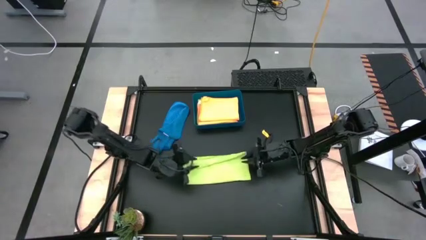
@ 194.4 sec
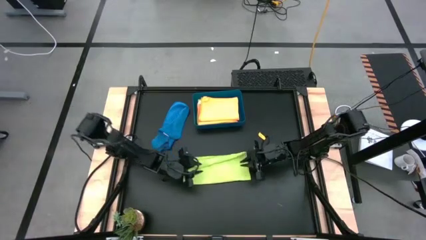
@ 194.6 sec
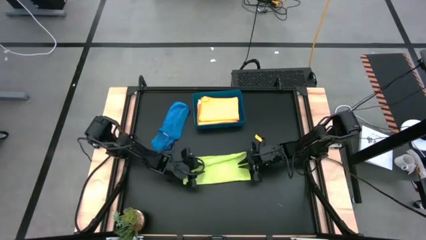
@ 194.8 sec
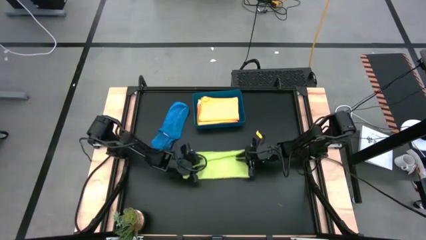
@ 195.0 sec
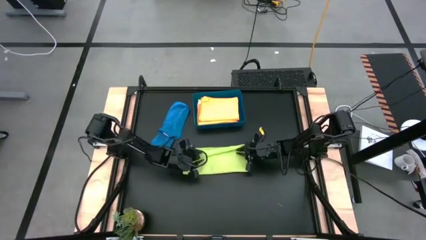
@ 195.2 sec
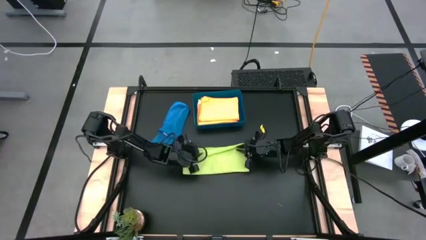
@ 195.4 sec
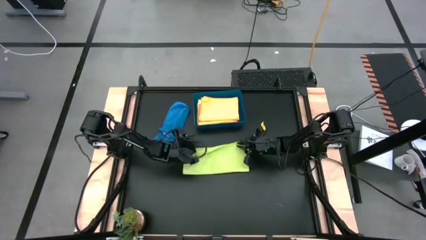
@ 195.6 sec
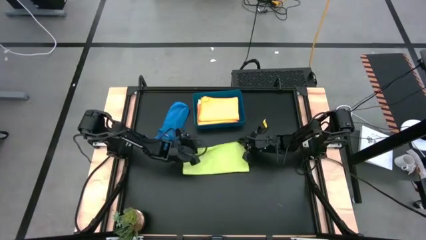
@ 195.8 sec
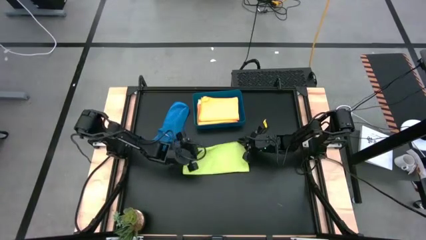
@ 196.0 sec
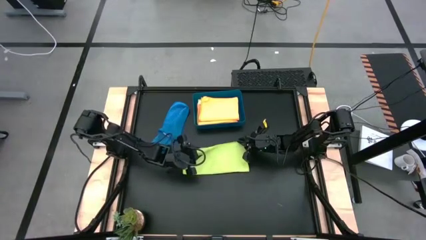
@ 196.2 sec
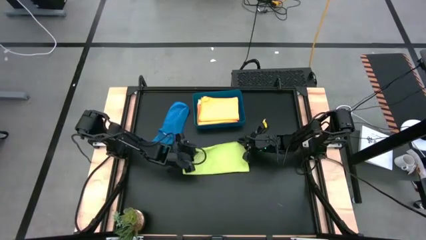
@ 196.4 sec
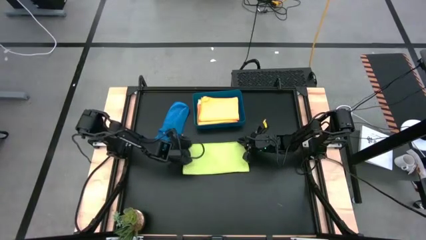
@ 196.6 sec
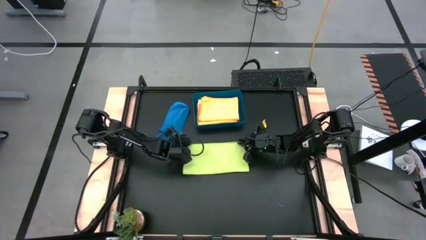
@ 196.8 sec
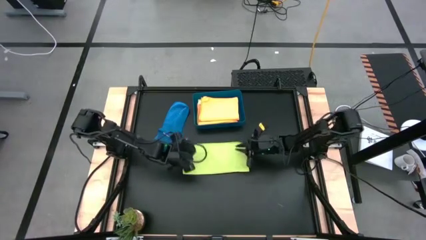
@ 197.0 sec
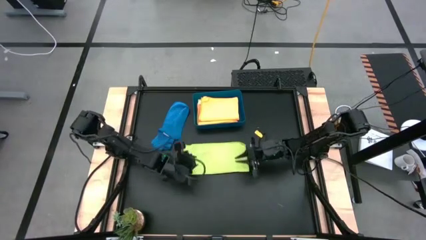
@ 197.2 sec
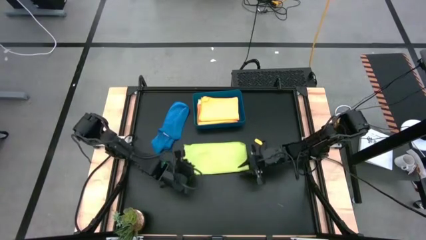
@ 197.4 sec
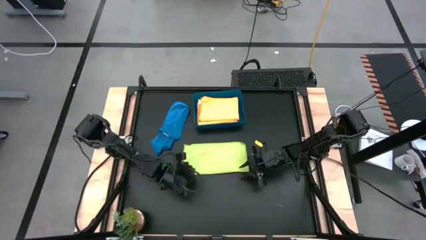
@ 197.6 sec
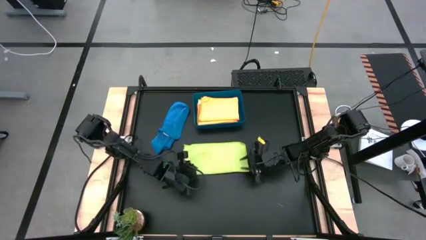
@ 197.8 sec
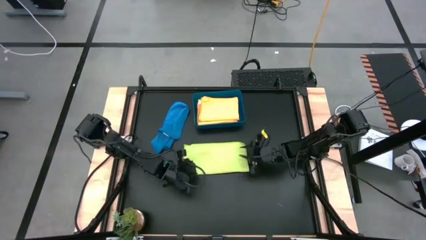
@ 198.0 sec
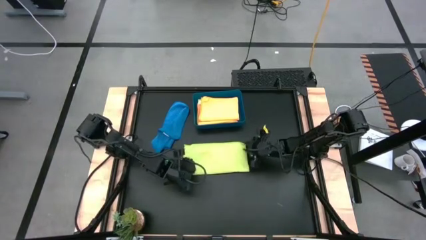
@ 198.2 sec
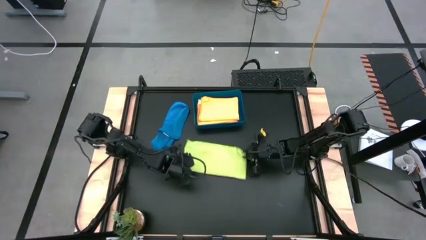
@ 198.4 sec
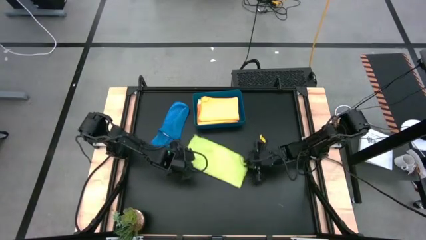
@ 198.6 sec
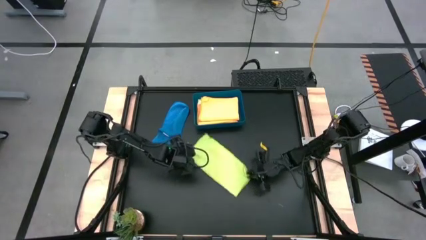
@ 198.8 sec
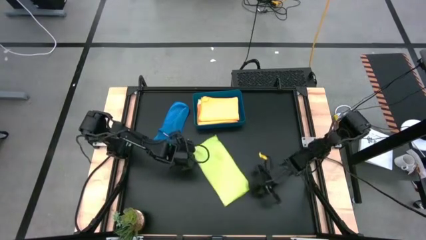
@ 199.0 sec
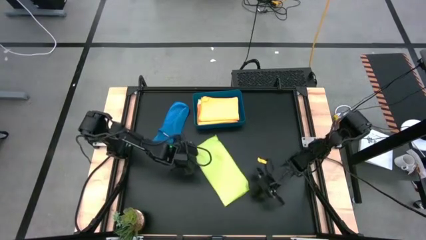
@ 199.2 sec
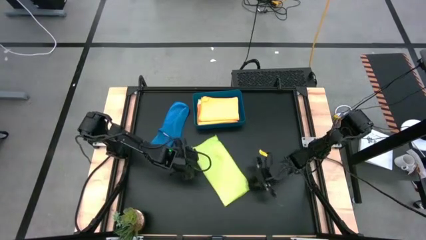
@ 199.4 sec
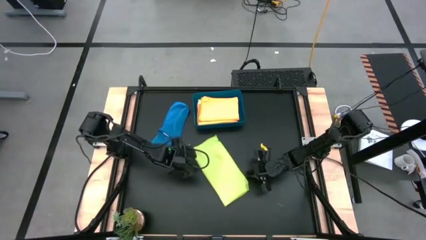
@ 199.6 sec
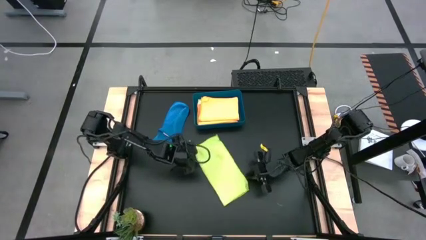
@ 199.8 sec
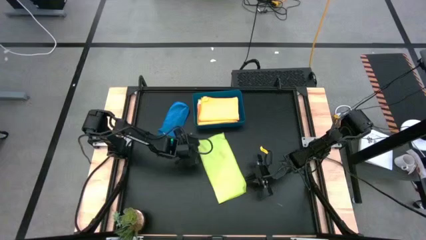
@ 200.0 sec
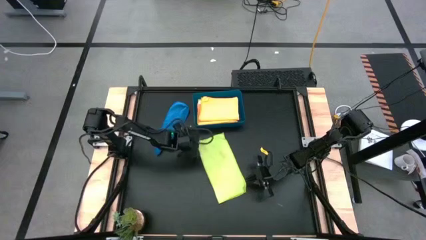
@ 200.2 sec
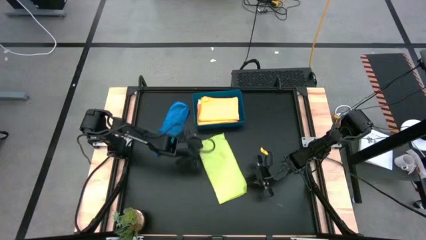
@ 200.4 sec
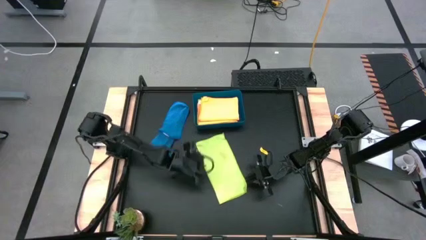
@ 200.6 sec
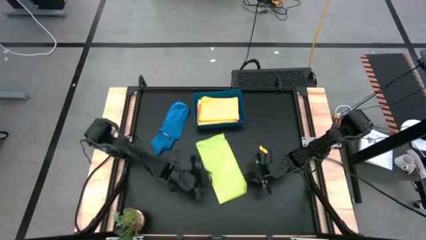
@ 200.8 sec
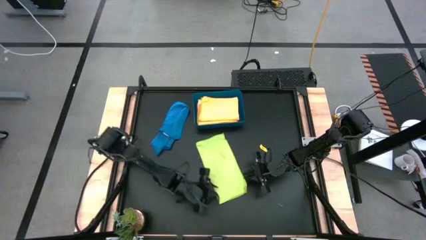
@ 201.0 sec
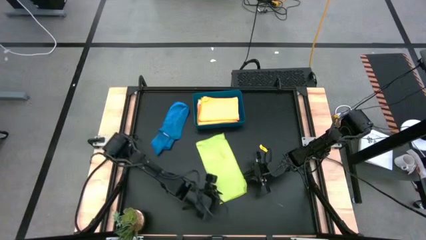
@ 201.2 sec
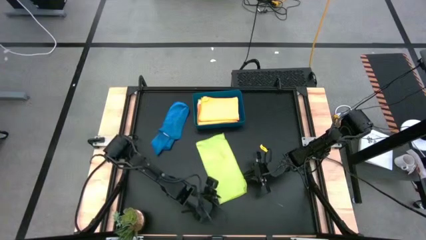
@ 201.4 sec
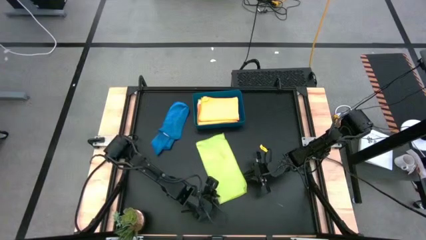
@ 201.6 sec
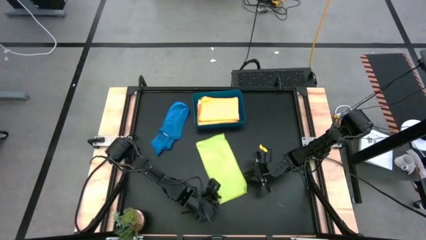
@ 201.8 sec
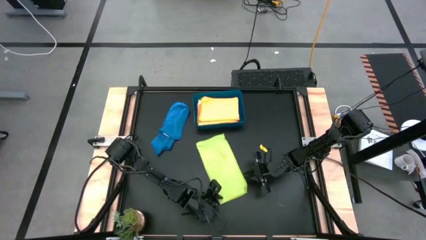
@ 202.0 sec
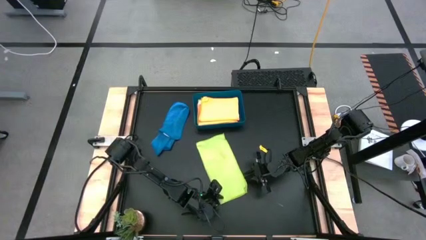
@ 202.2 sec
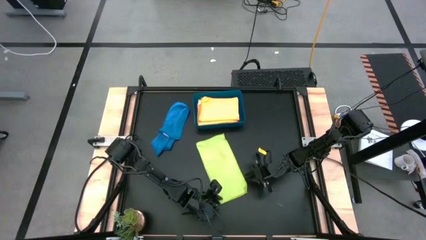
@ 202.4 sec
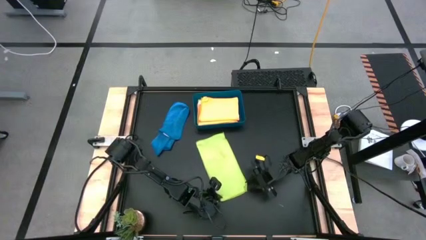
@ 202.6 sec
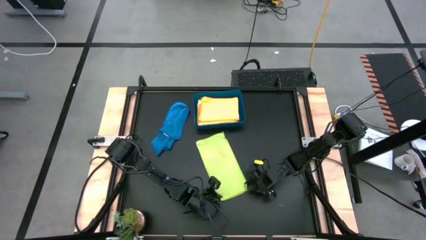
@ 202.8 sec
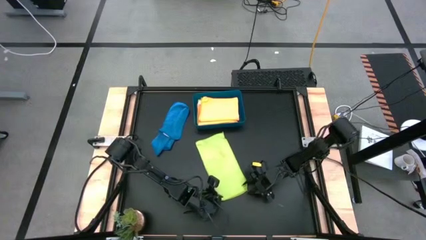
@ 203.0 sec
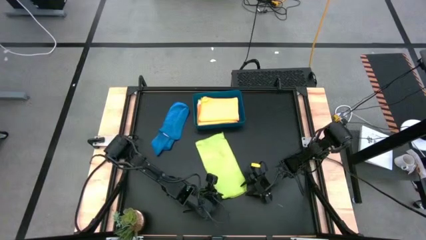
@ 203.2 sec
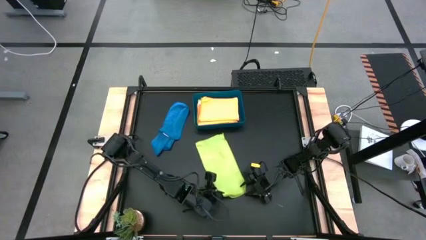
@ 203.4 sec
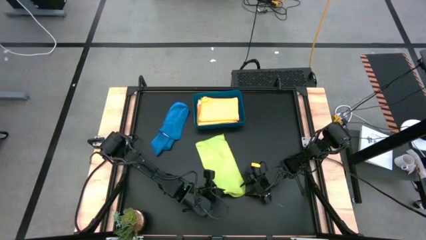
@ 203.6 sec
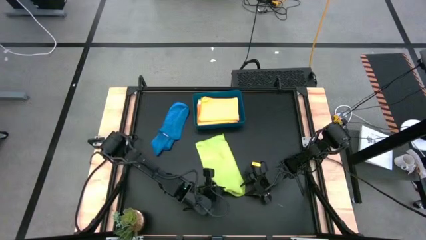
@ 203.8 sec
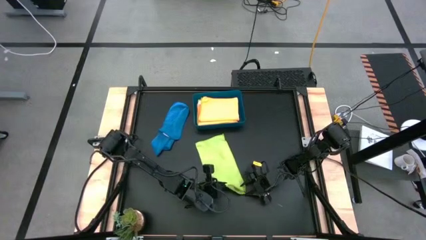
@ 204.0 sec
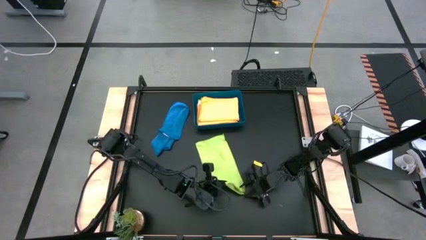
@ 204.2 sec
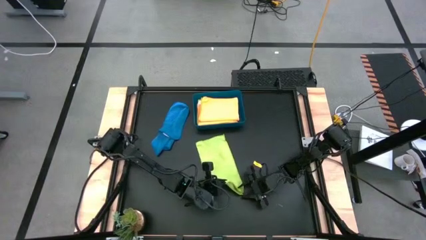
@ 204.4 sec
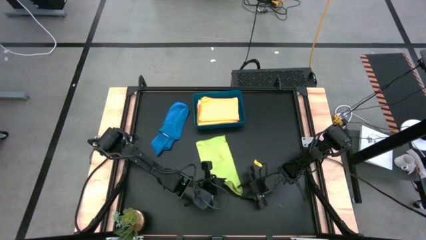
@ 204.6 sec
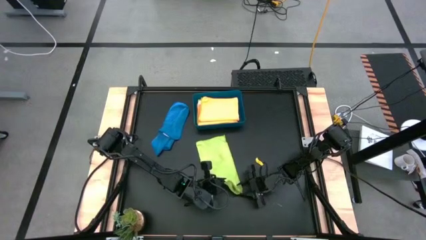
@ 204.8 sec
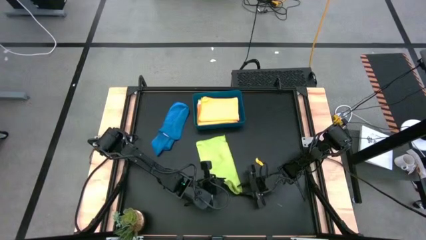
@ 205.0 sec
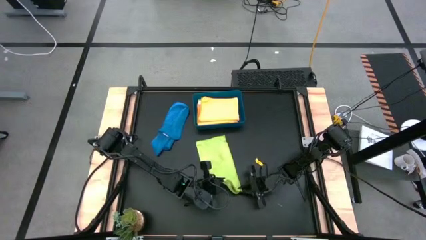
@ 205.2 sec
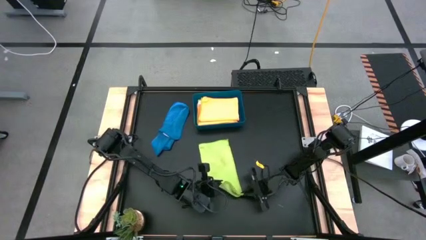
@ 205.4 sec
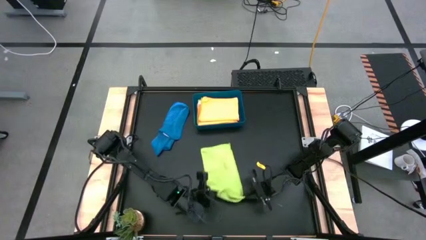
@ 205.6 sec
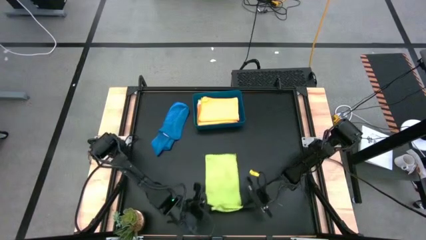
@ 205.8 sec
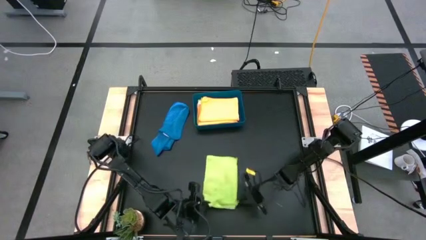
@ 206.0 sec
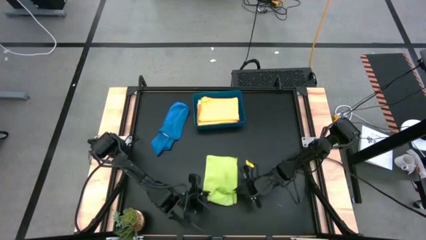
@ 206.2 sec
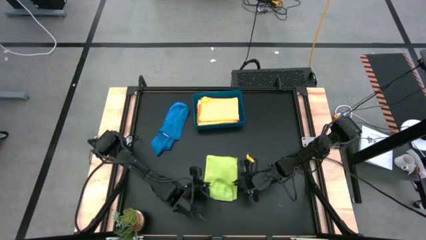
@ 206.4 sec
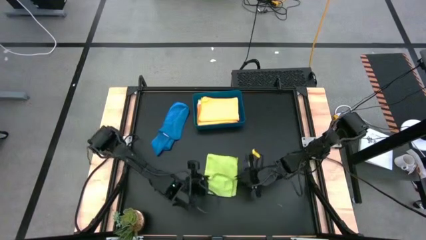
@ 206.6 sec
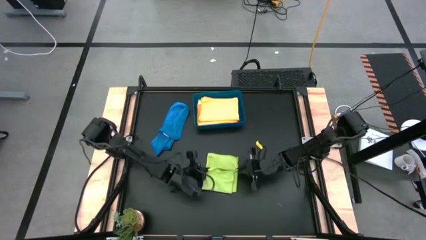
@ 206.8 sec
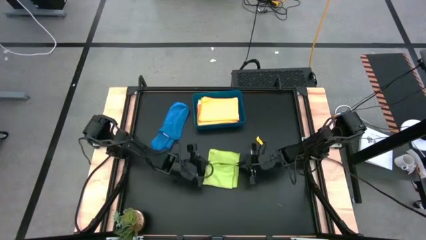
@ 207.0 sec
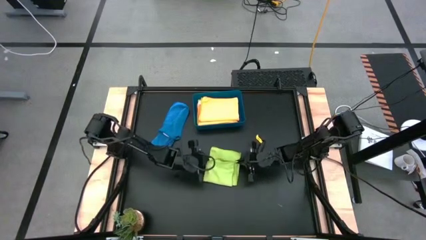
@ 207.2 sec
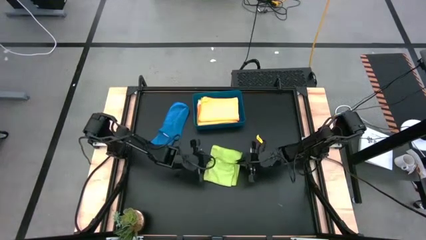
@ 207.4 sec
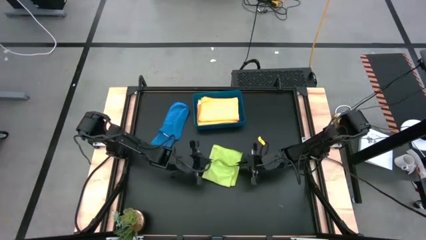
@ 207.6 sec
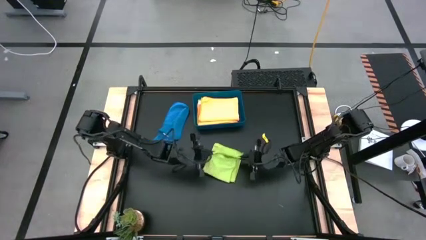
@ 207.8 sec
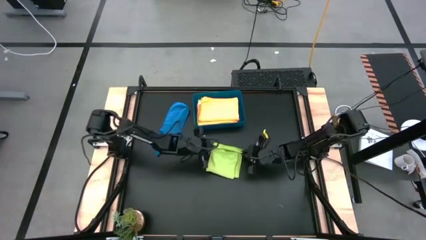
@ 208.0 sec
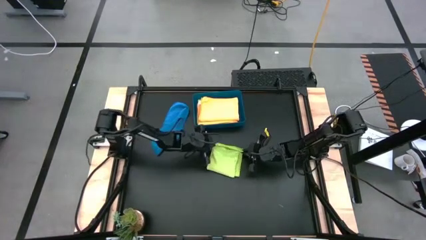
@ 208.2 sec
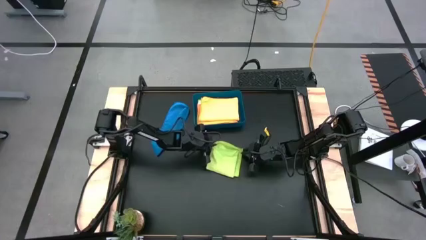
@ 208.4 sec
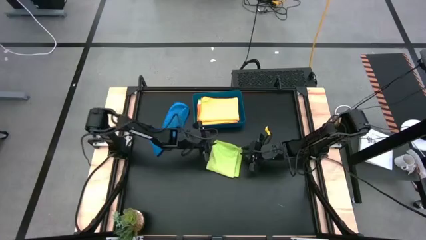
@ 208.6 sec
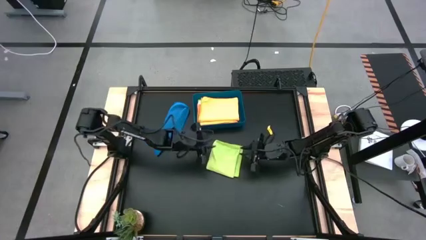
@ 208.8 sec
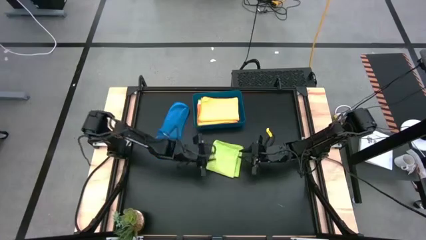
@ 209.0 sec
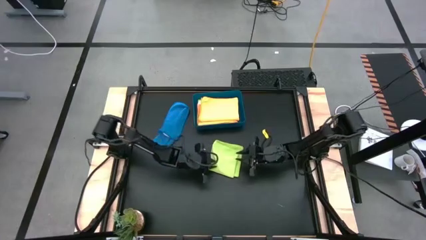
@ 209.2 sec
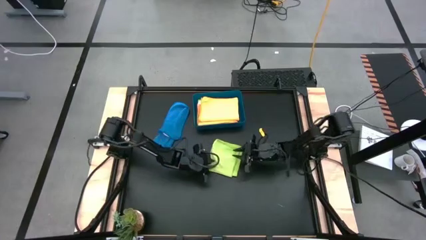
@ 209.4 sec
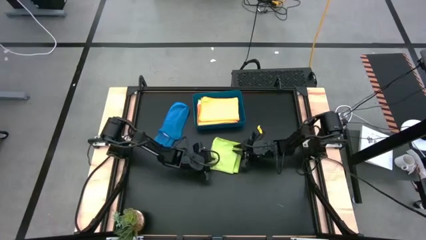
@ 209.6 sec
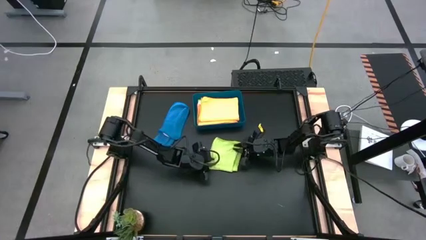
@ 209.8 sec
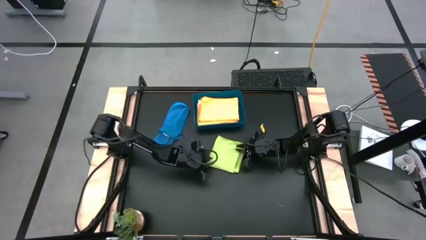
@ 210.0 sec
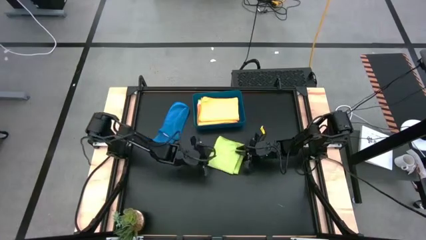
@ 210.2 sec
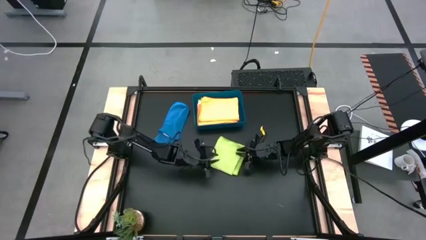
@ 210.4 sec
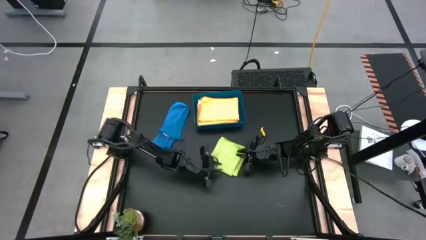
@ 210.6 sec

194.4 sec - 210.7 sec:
Task: Fold microfiber towels
Fold the green microfiber cloth
